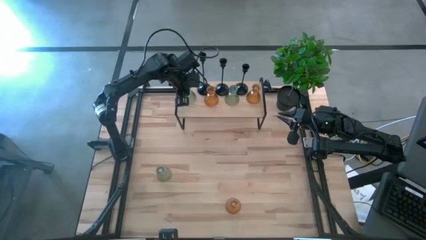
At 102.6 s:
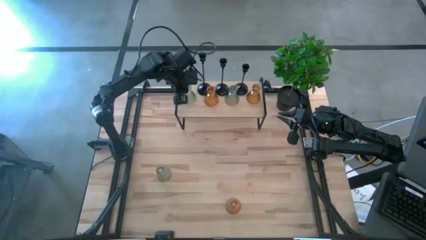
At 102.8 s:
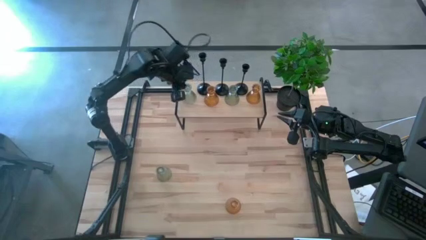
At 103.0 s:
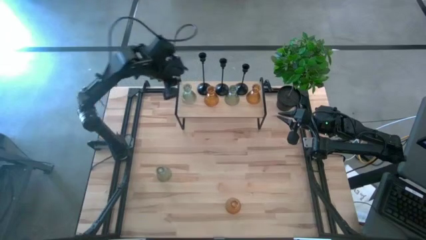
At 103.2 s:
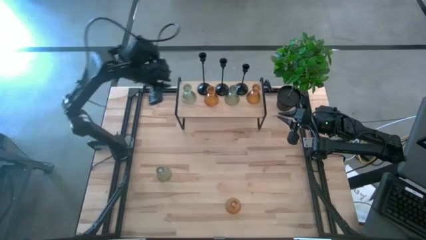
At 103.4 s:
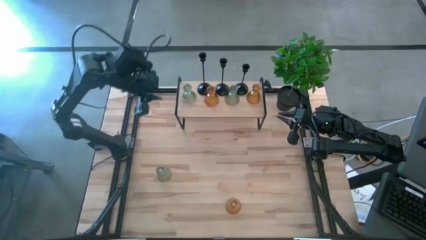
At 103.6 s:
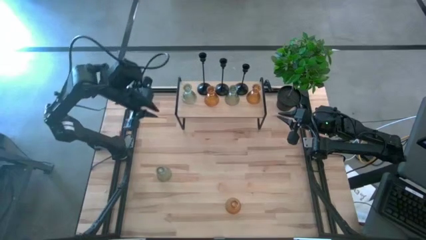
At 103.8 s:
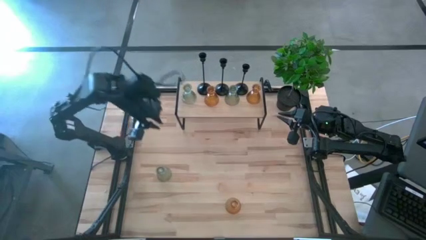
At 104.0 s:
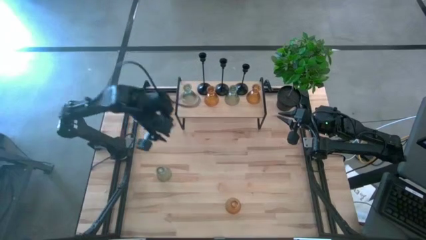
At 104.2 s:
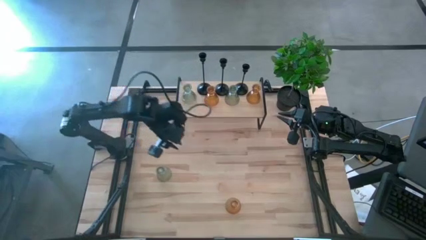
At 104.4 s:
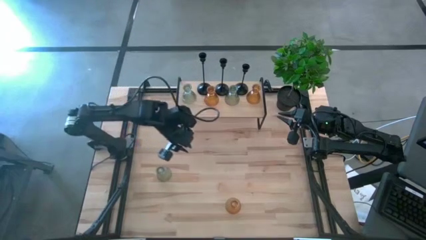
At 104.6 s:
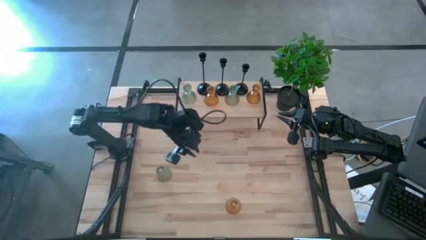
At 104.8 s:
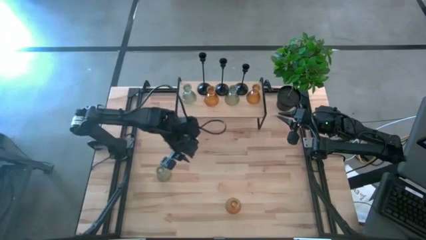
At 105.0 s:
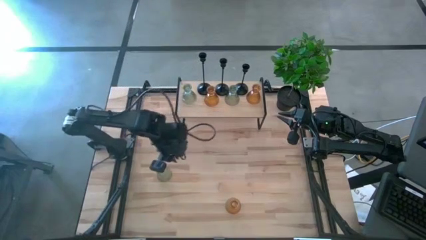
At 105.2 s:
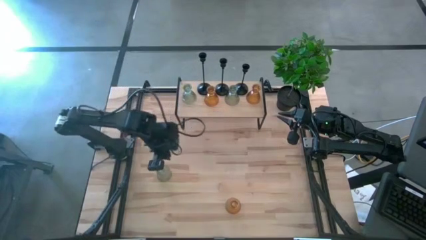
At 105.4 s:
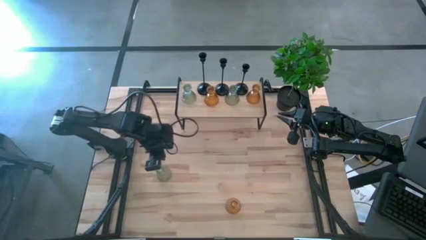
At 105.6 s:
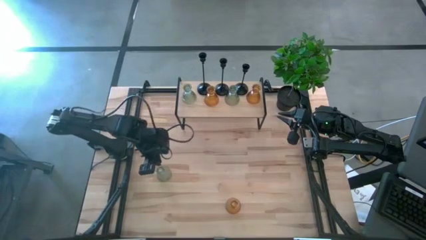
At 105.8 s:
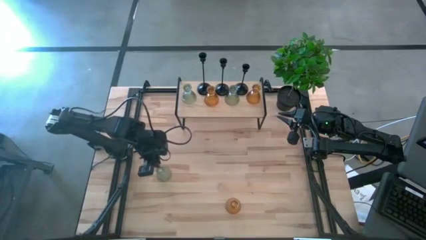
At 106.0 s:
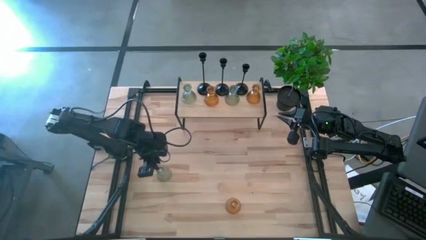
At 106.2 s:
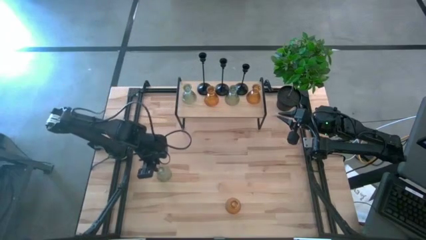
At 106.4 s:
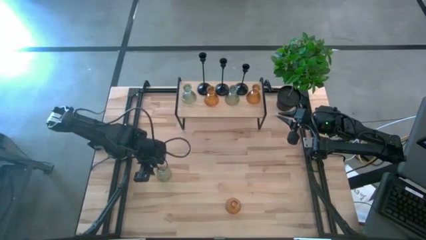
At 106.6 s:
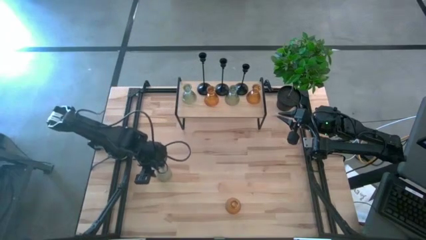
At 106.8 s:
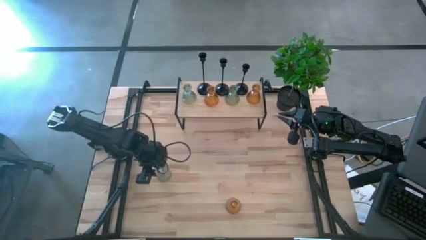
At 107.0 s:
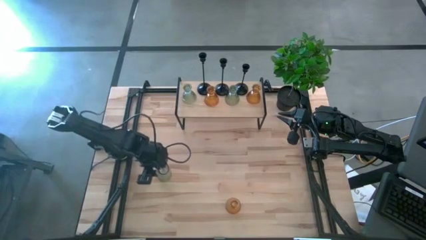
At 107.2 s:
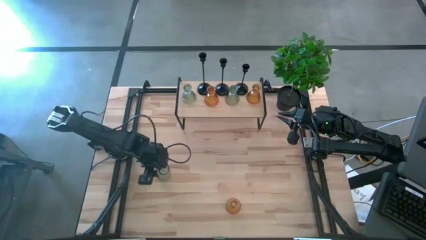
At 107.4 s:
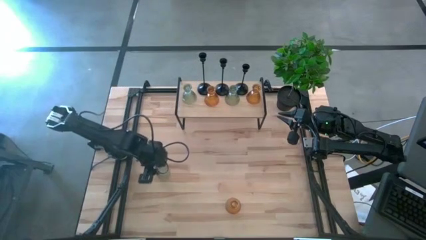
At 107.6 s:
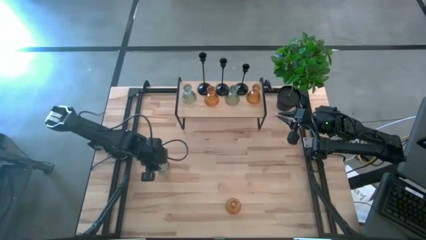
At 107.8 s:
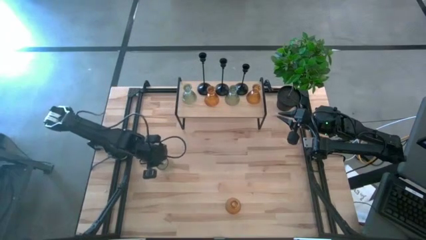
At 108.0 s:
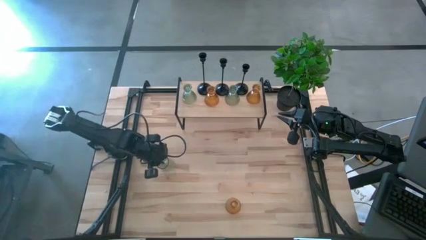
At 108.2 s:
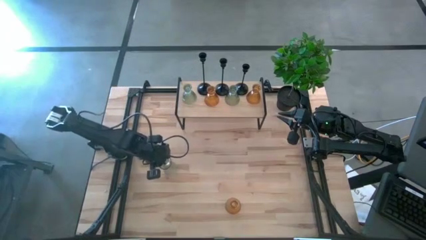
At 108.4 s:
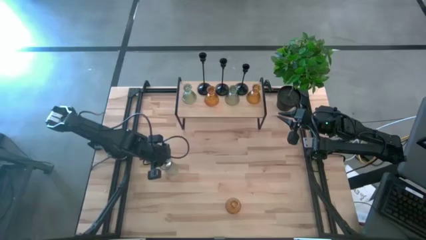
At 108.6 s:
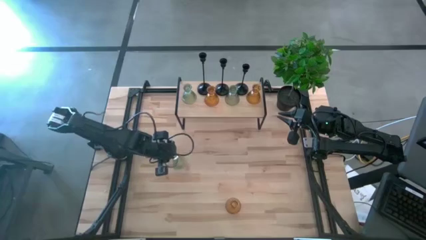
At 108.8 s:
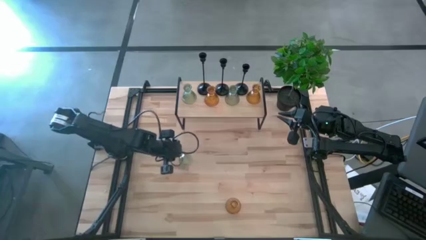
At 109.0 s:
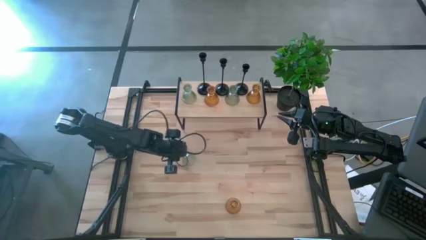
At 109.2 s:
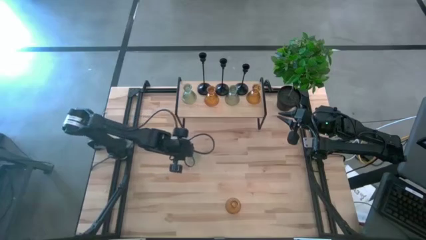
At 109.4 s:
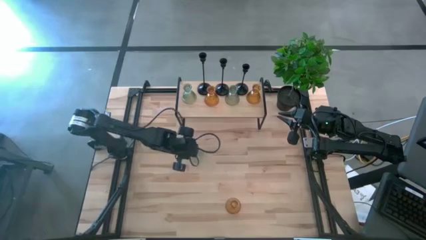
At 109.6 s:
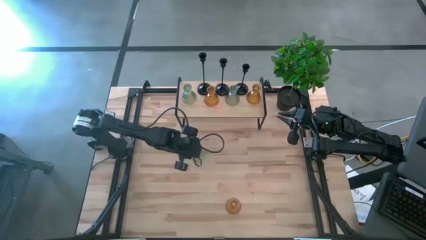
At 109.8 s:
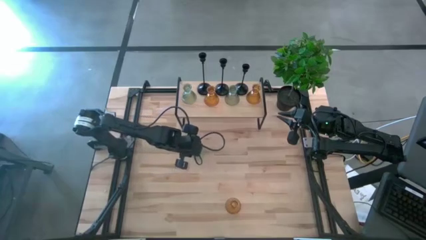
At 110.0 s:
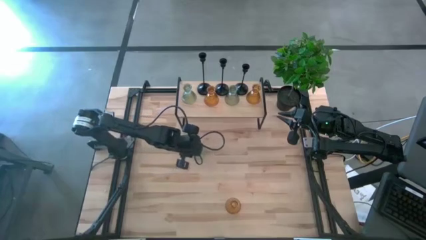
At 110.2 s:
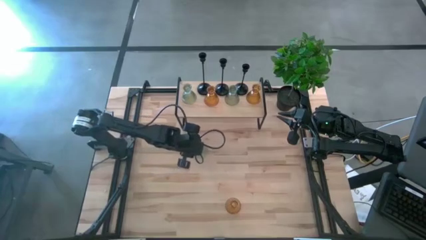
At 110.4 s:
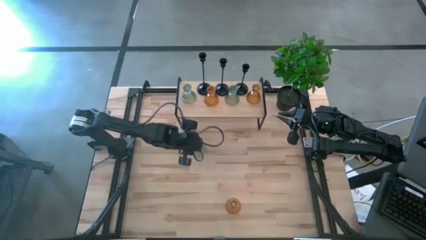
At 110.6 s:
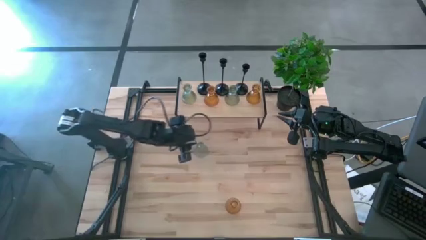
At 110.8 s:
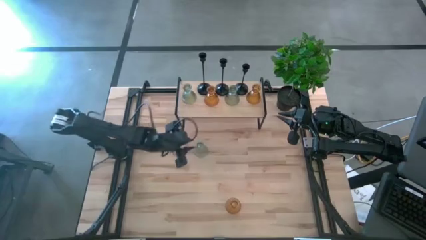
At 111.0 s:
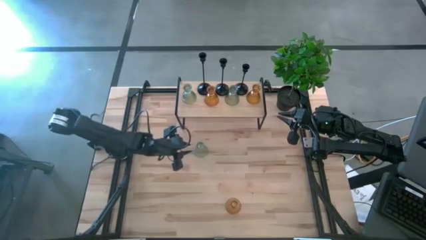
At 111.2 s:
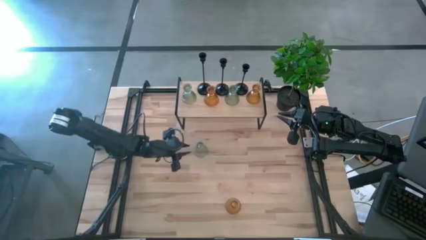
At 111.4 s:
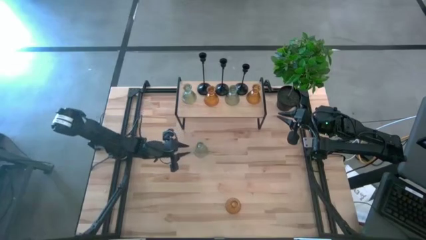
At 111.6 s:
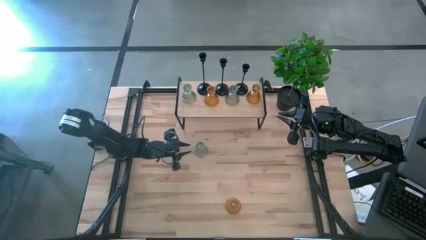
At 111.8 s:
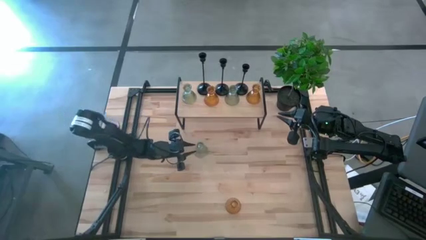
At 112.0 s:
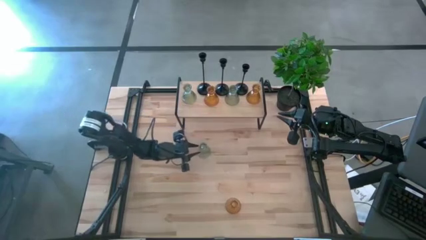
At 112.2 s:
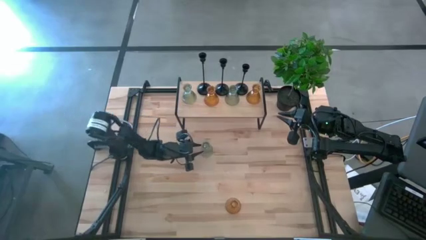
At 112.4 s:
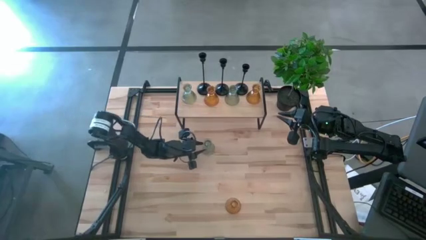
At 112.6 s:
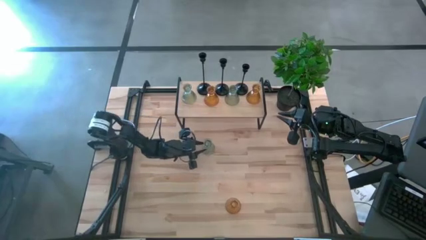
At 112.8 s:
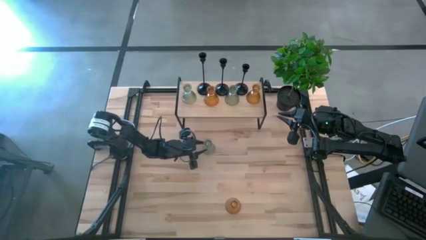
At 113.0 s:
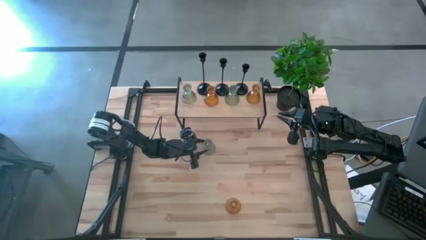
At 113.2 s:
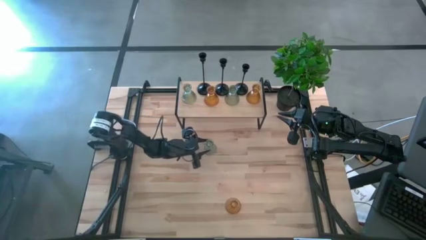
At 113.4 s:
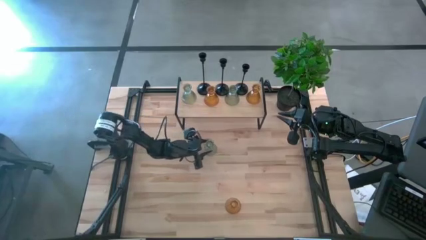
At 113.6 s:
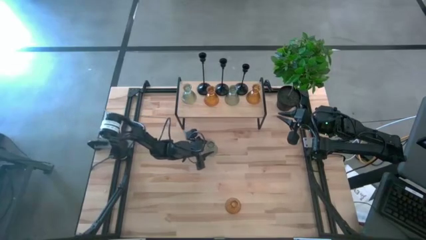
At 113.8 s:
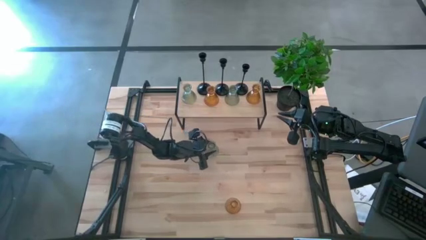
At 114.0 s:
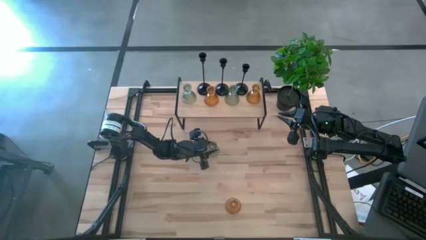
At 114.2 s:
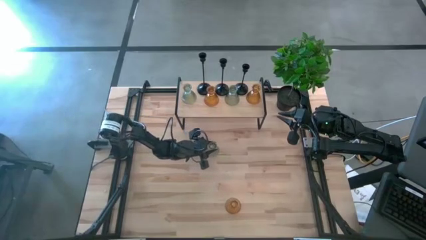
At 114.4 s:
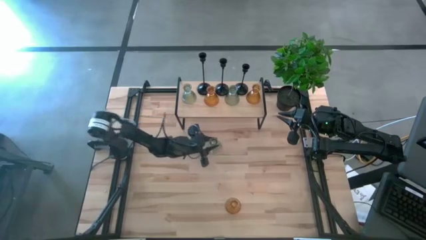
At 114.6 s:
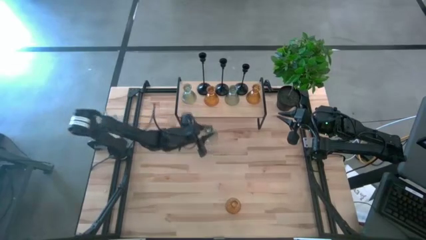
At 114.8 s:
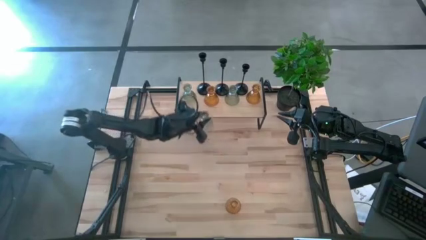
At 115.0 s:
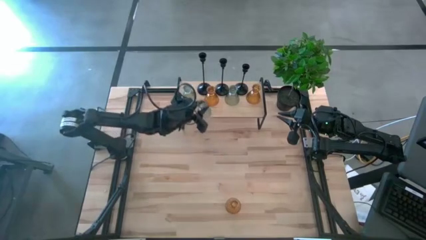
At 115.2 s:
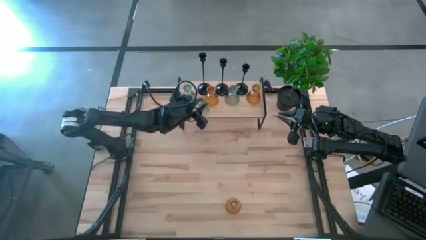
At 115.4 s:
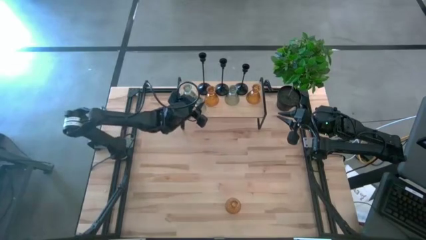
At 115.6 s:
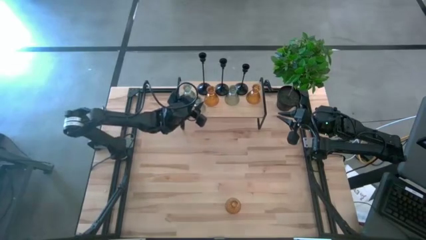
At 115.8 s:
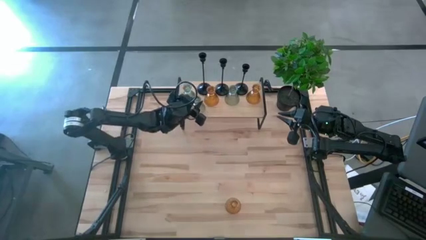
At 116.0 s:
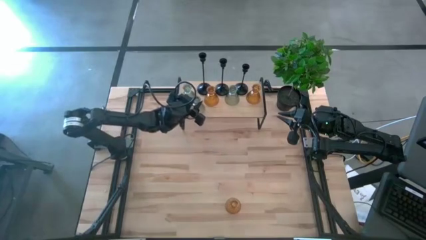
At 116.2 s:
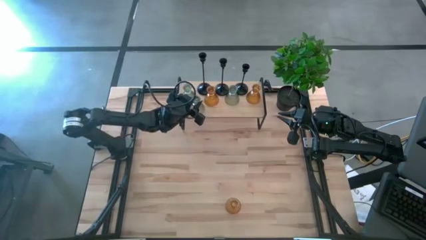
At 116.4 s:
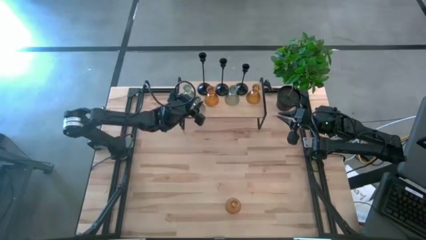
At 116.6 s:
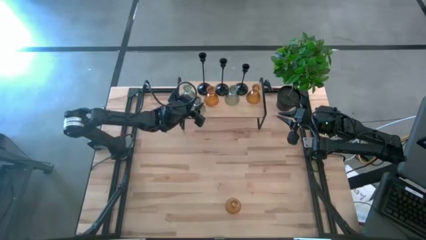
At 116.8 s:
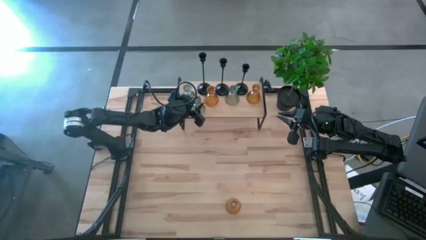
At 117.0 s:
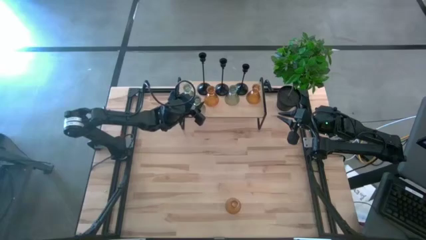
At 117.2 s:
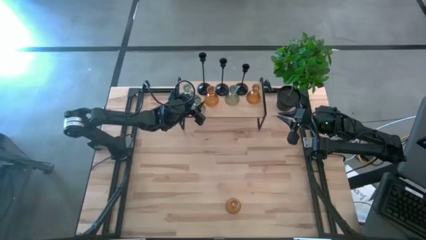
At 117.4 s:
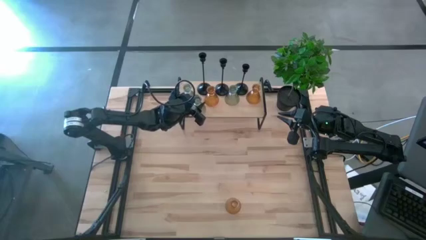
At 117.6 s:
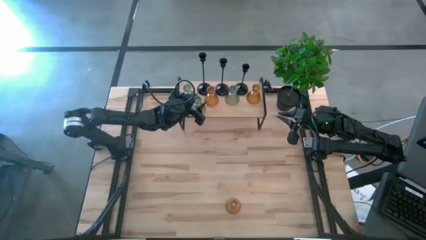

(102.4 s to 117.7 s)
Task: Pick & Place candle stick holders
Put the green candle holder on the shelf

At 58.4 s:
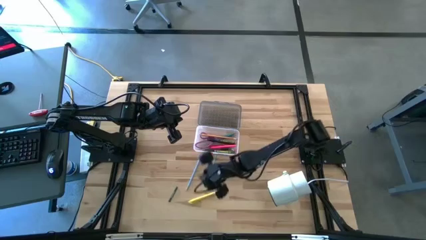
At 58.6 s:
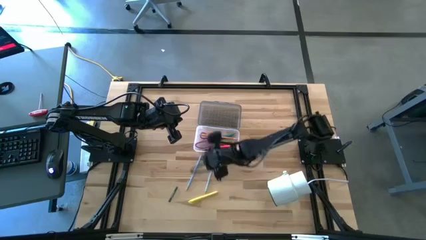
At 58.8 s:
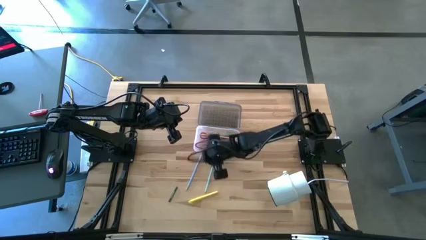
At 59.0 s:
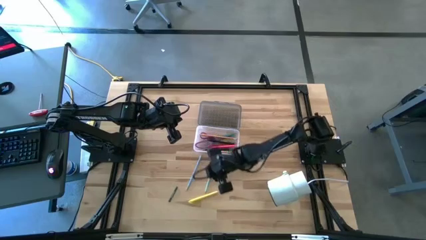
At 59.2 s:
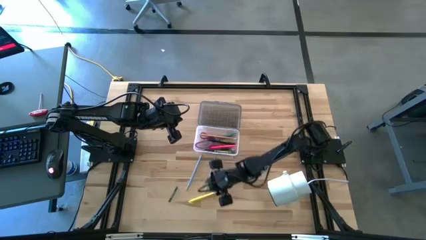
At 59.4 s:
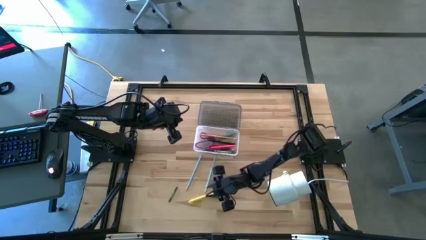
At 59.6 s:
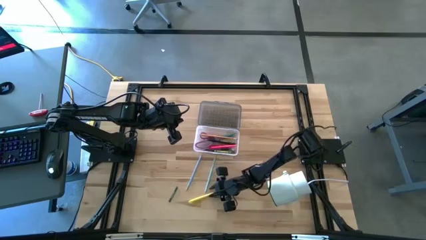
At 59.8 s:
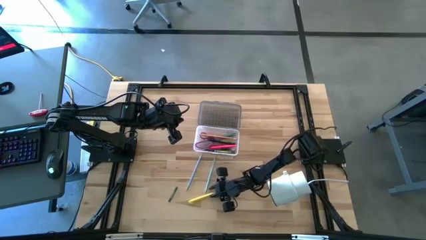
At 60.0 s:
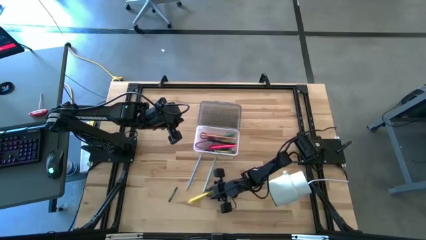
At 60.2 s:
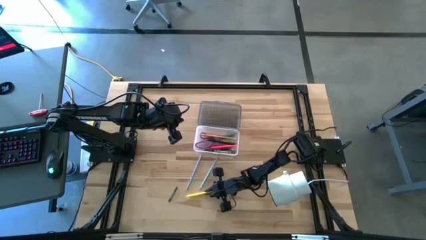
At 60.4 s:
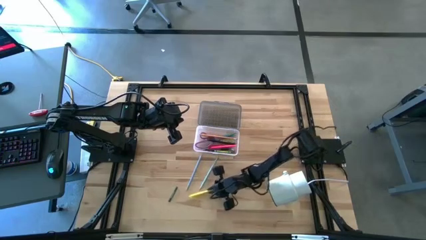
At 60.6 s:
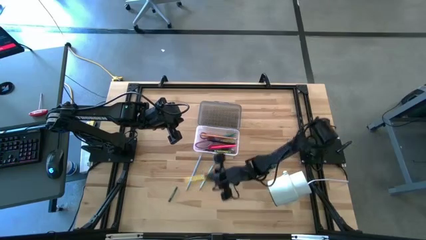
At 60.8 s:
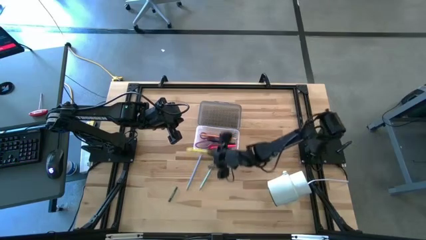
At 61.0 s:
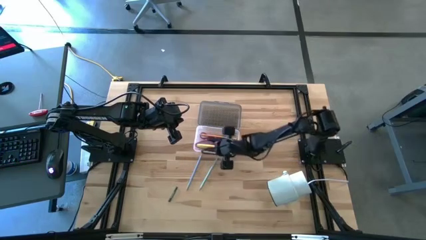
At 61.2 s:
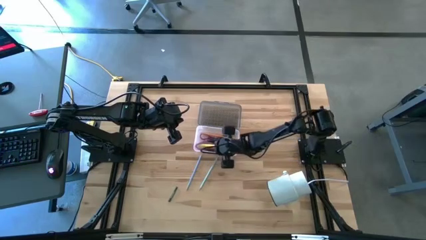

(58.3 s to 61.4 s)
Task: Pick & place school supplies into a supply box
Put the yellow pen into the black supply box
